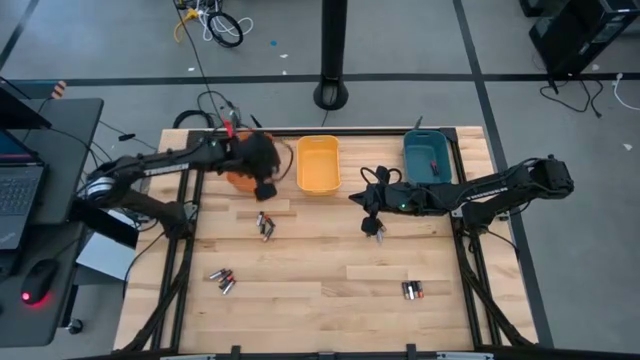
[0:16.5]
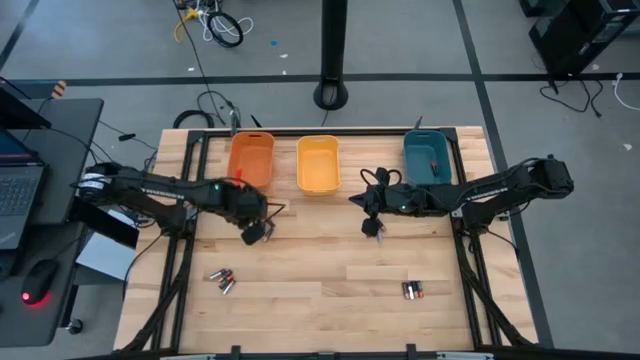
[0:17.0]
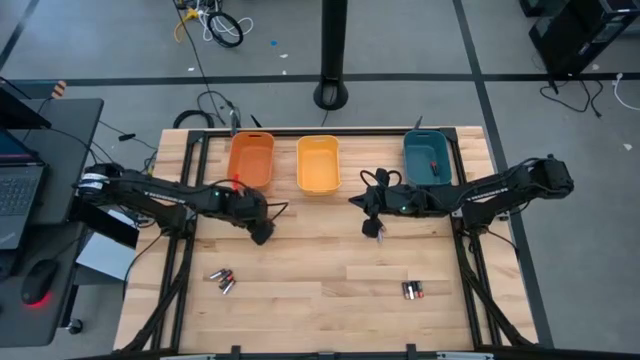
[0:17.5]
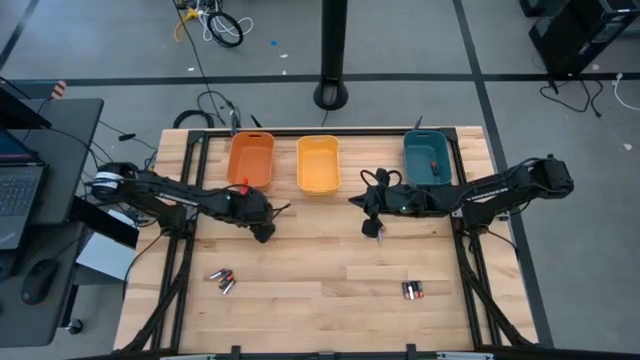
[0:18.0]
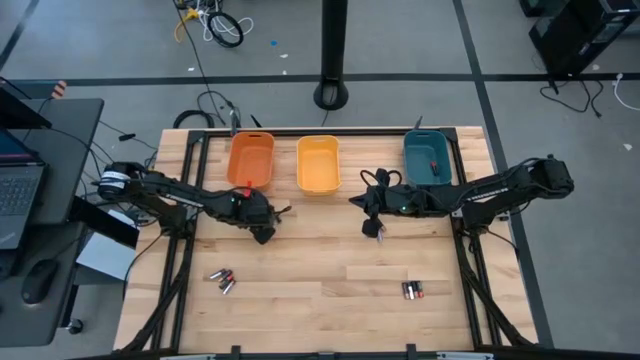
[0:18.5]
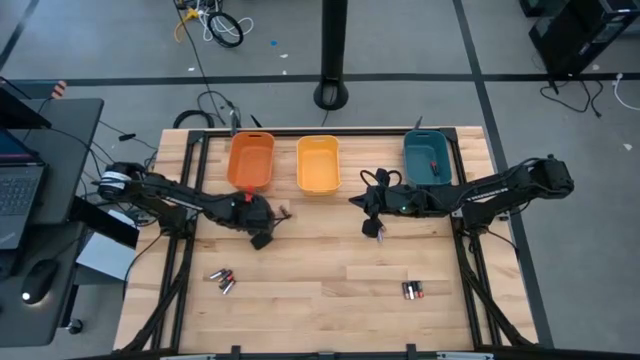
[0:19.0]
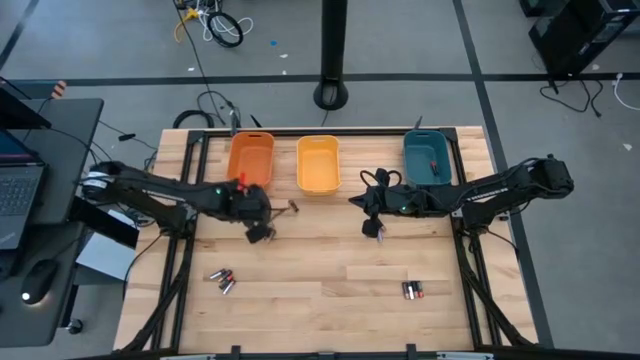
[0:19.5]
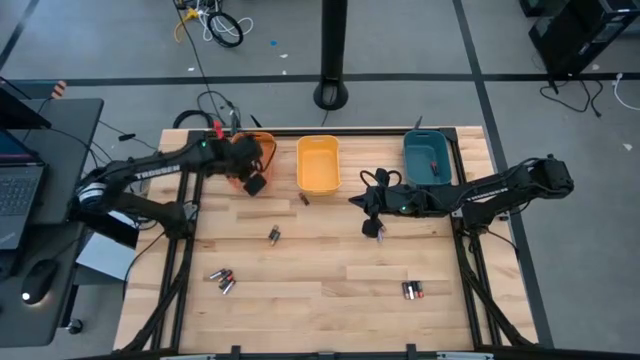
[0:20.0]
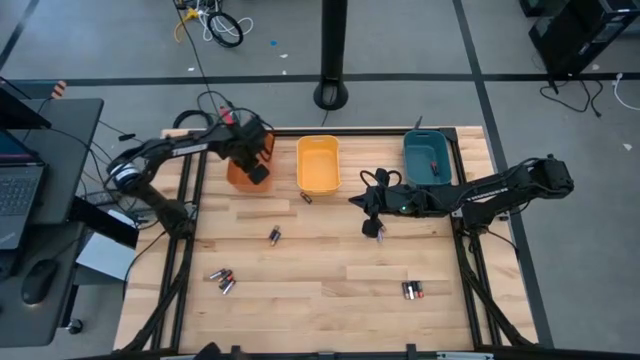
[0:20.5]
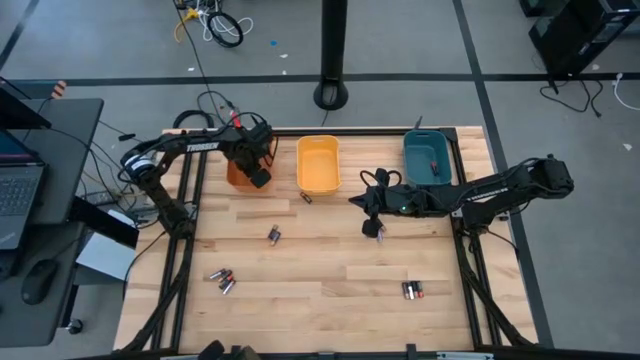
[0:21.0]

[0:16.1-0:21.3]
Task: Sort batteries
Put the silver battery into the orange bin

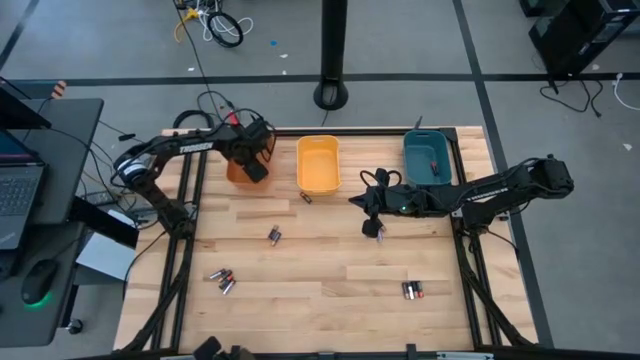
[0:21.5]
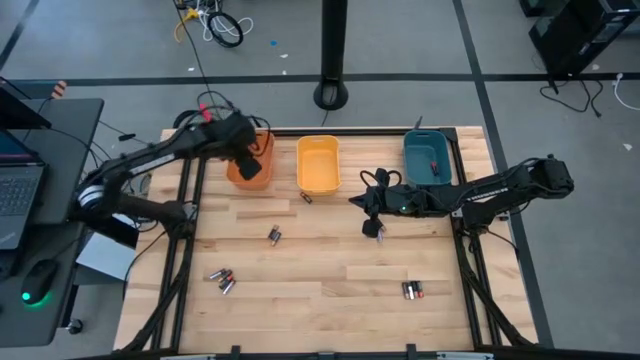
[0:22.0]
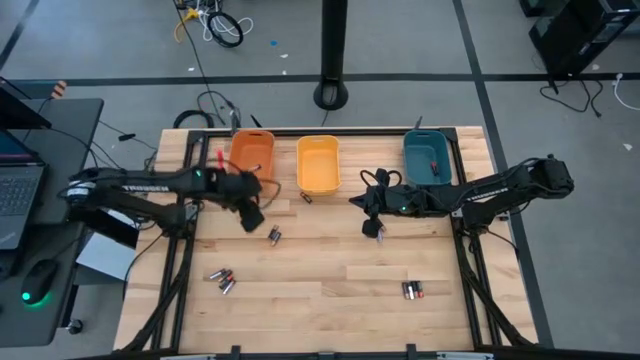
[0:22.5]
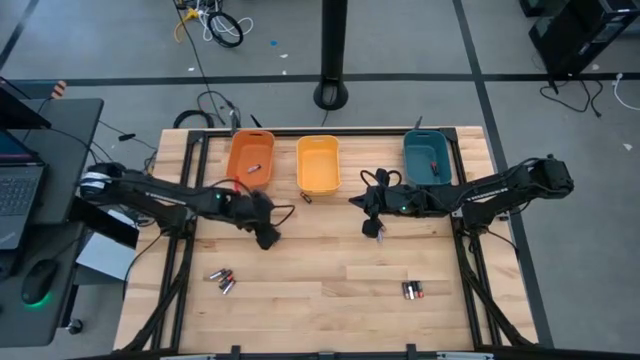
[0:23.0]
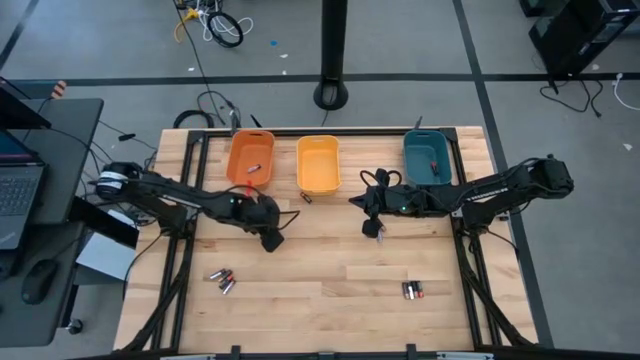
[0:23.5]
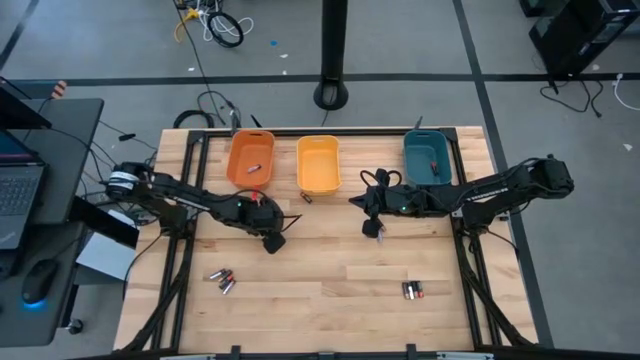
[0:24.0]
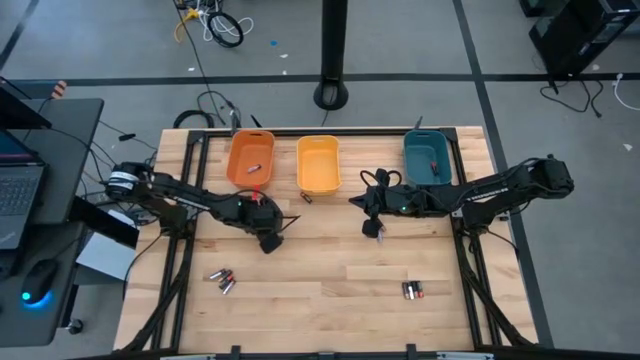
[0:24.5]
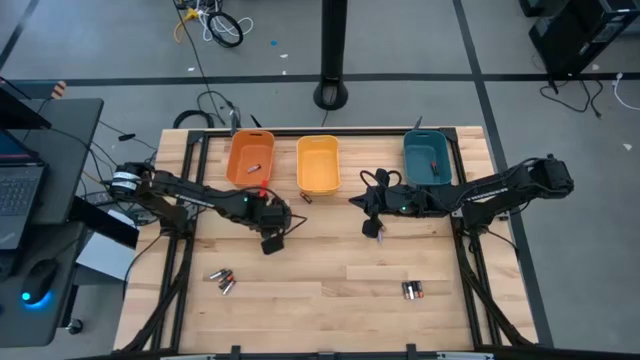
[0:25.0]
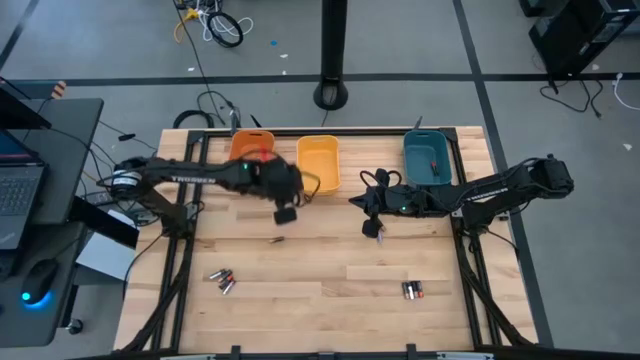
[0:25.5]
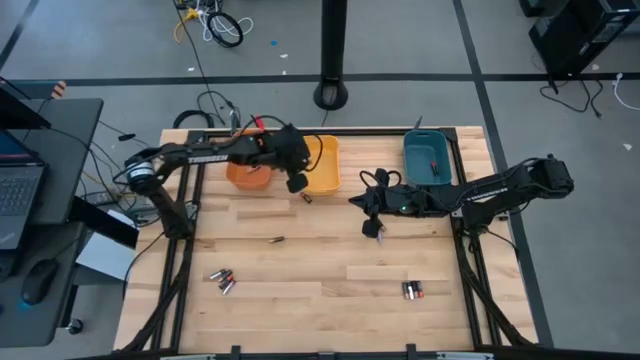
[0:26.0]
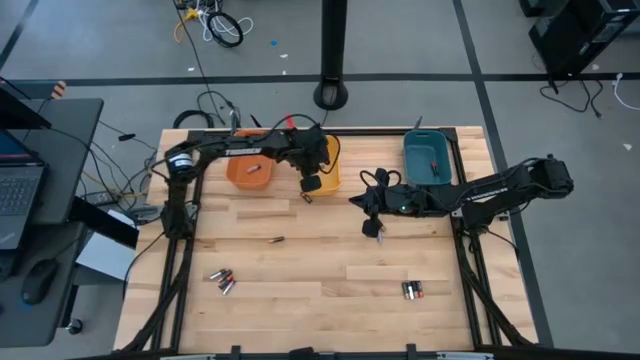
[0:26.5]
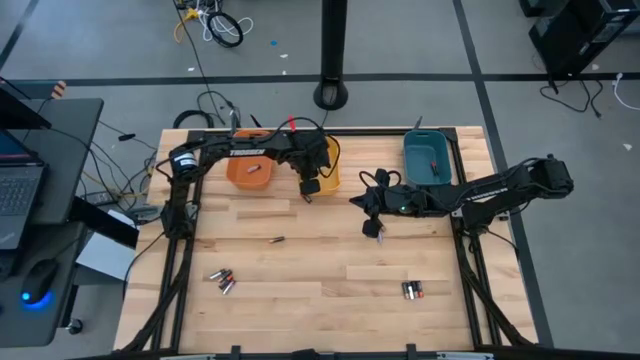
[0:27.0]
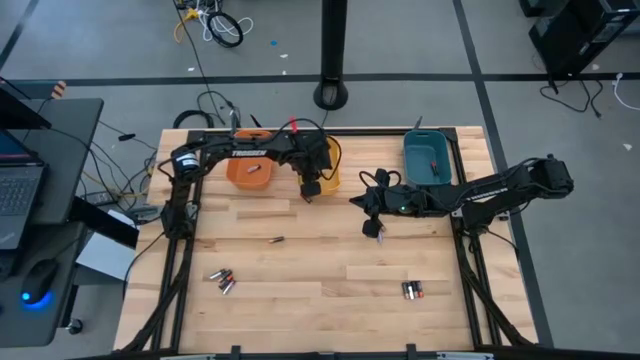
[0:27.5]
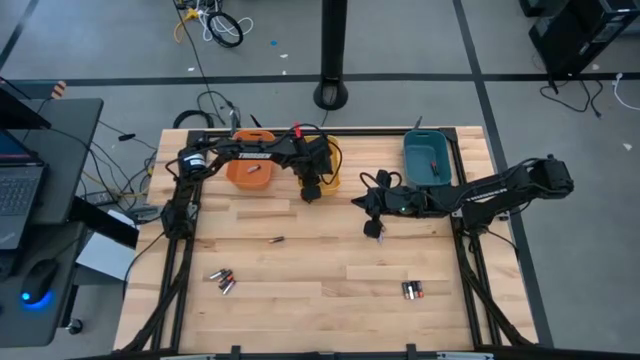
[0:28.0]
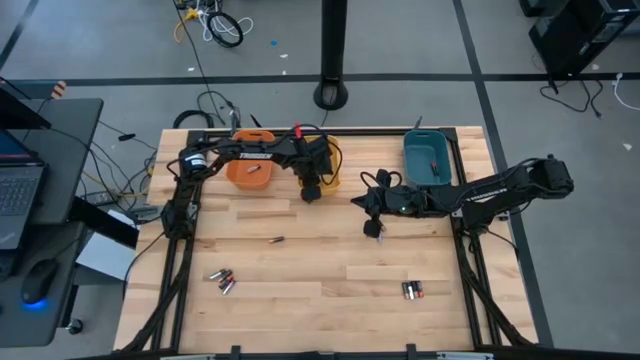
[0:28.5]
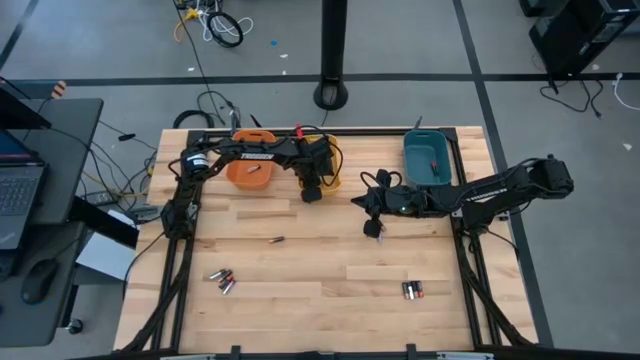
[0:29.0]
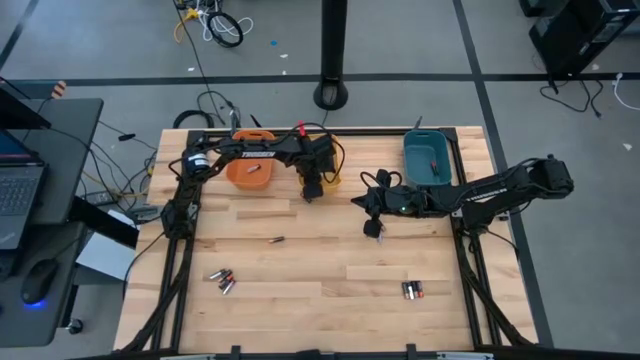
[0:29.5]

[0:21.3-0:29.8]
Put the black battery into the yellow bin

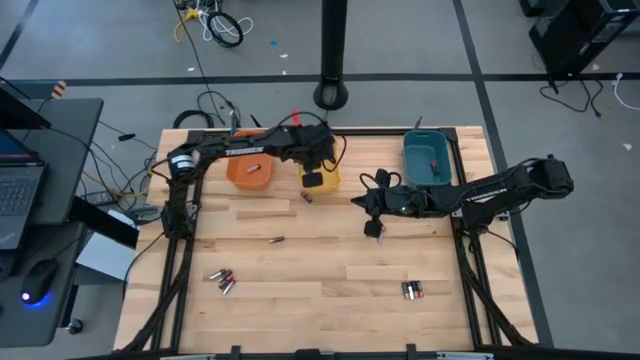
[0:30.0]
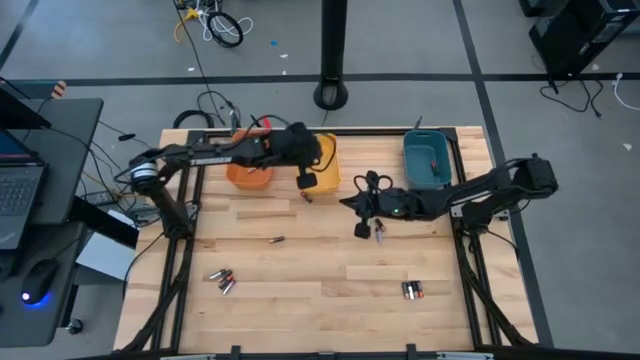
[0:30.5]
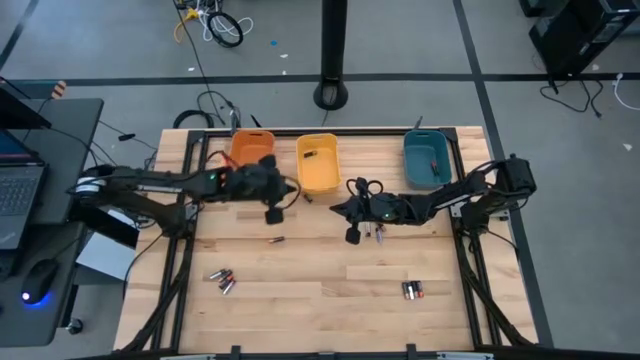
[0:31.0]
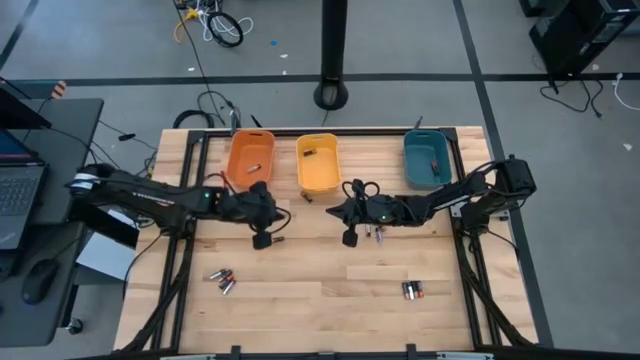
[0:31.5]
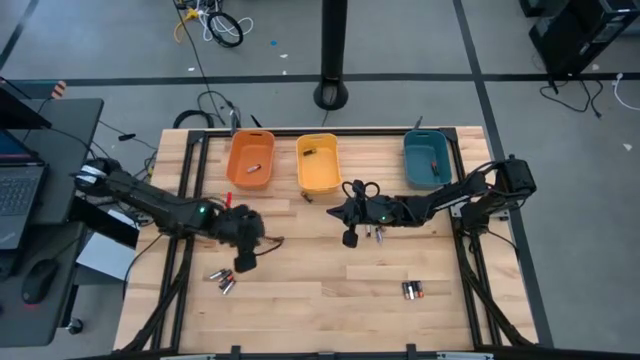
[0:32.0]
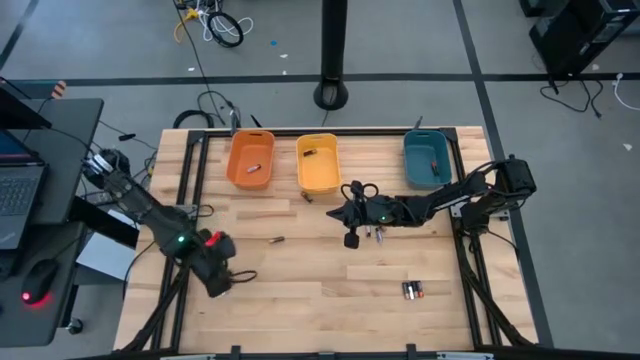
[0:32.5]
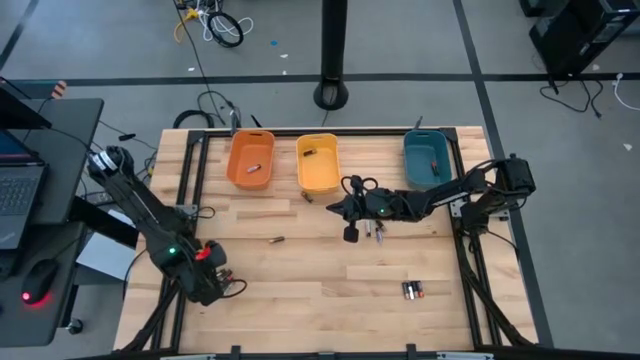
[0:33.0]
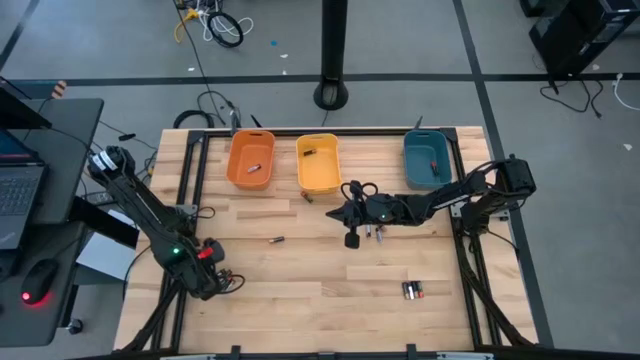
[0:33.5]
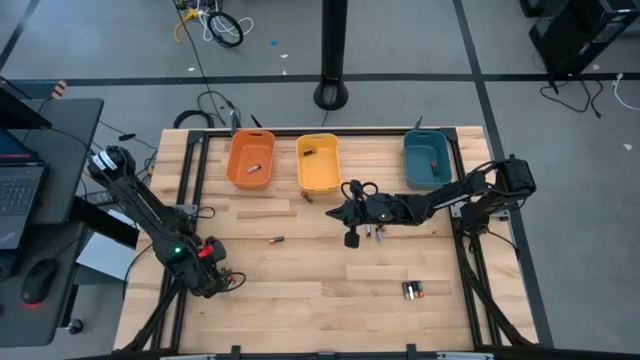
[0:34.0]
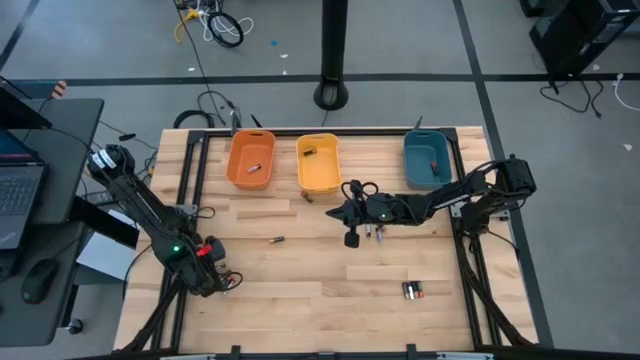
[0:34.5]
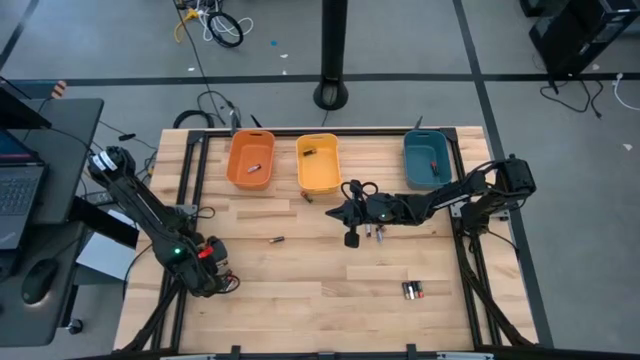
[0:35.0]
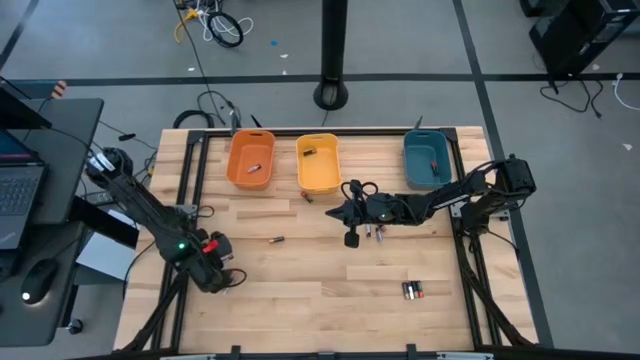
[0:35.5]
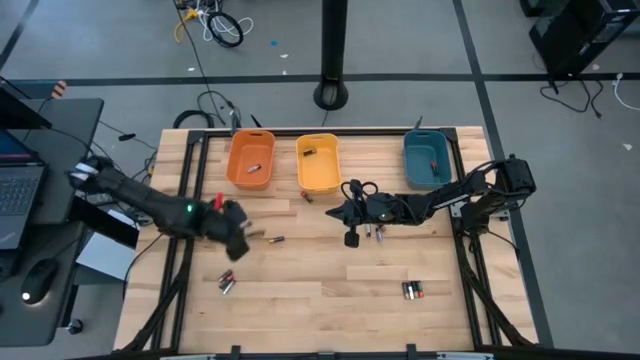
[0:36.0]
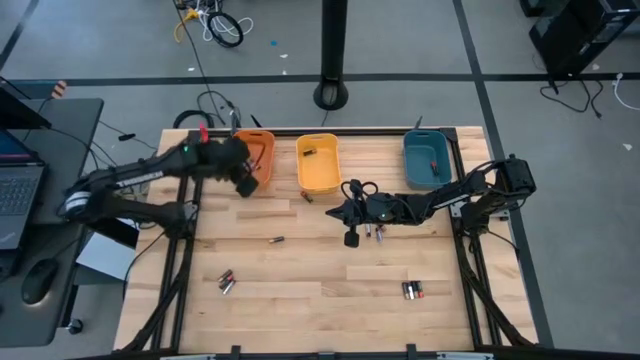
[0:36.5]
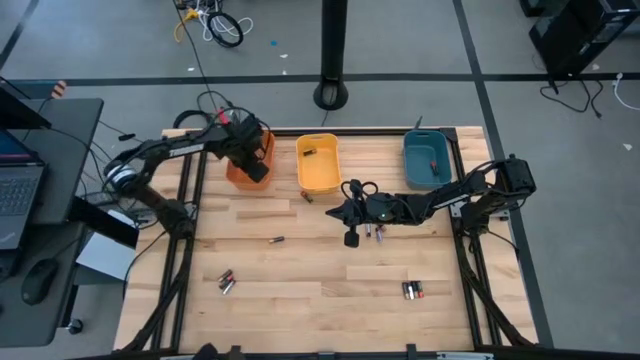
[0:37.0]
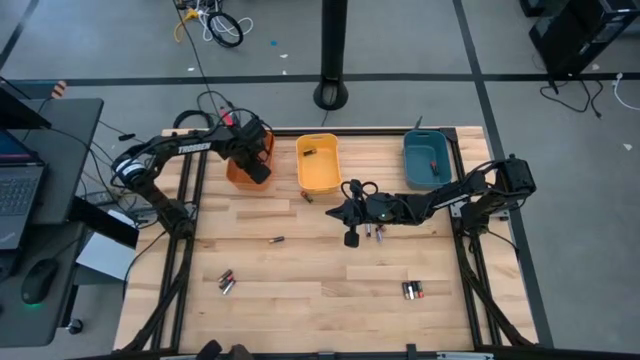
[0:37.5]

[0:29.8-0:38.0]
Put the silver battery into the orange bin
